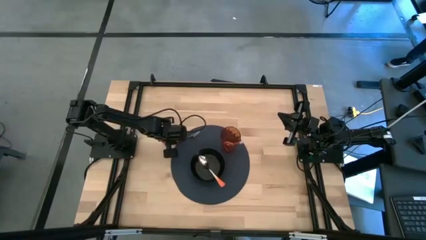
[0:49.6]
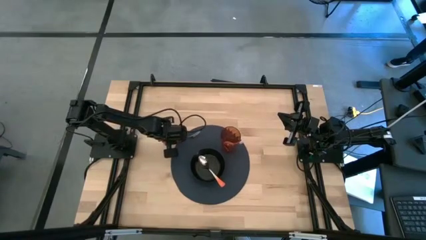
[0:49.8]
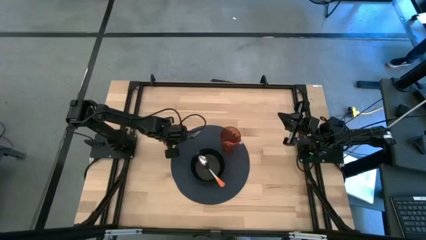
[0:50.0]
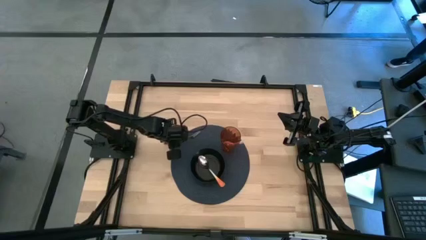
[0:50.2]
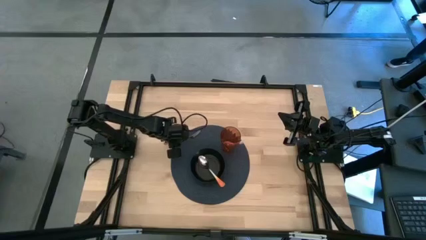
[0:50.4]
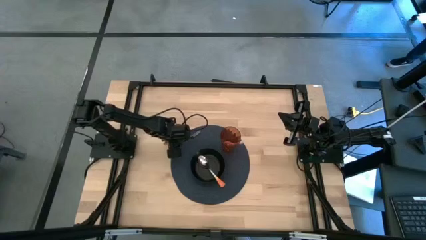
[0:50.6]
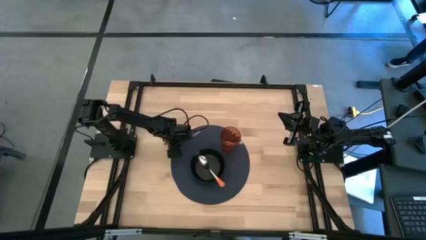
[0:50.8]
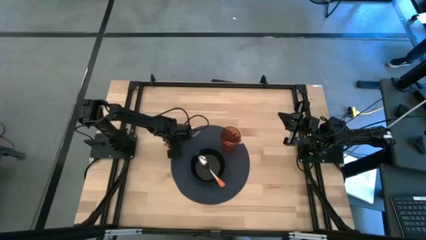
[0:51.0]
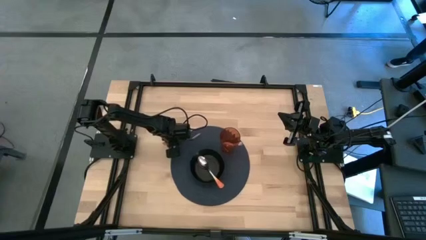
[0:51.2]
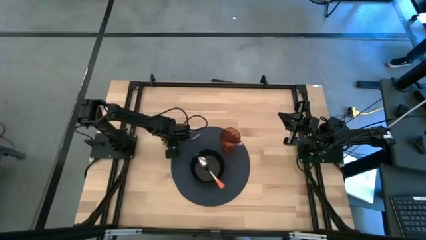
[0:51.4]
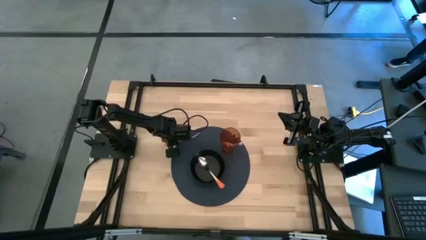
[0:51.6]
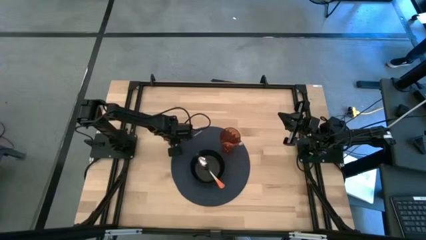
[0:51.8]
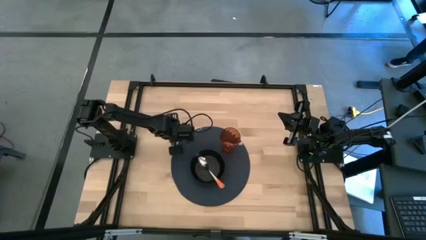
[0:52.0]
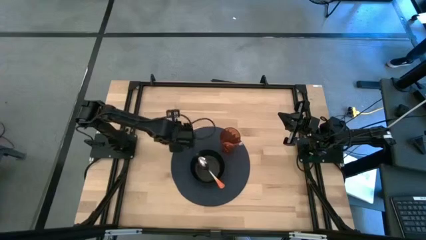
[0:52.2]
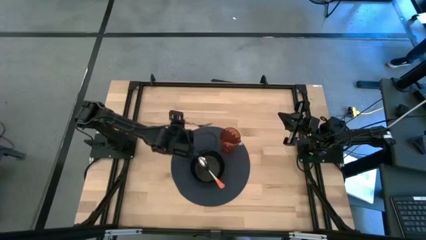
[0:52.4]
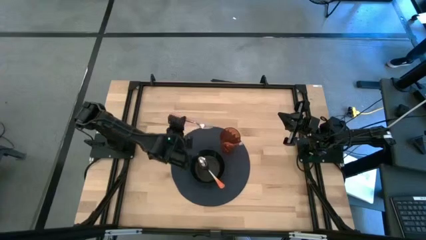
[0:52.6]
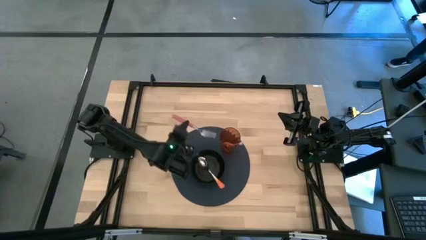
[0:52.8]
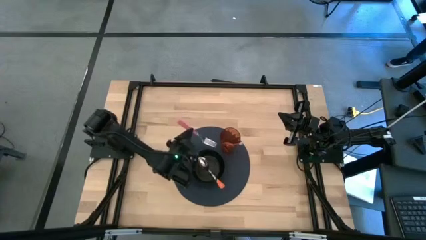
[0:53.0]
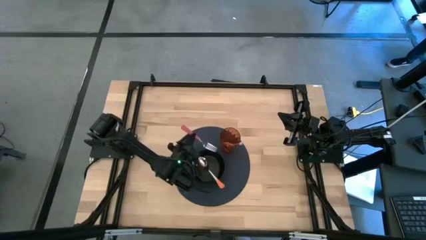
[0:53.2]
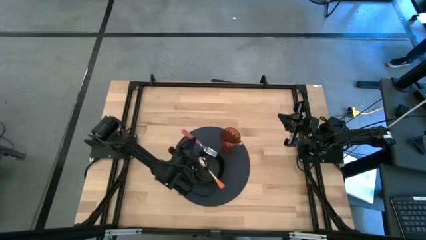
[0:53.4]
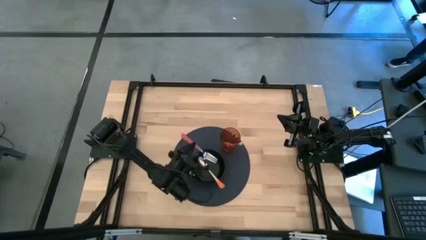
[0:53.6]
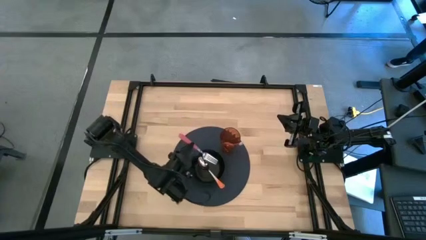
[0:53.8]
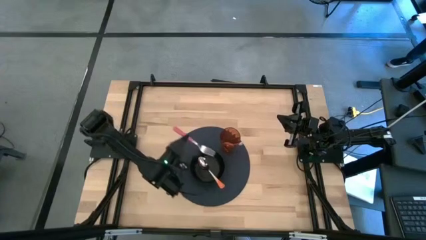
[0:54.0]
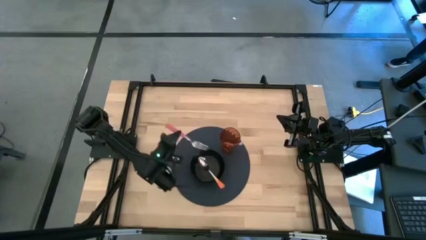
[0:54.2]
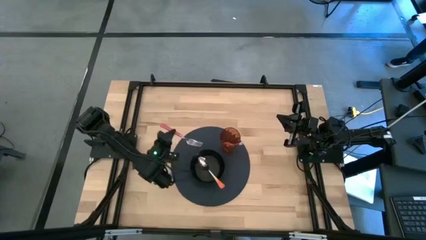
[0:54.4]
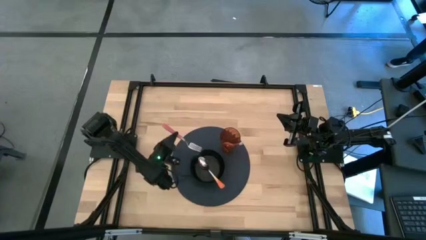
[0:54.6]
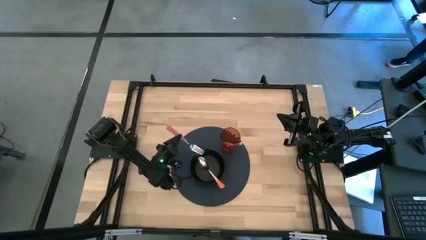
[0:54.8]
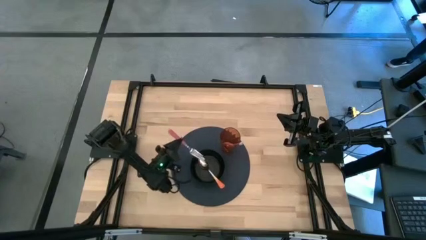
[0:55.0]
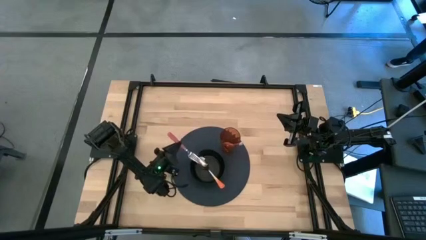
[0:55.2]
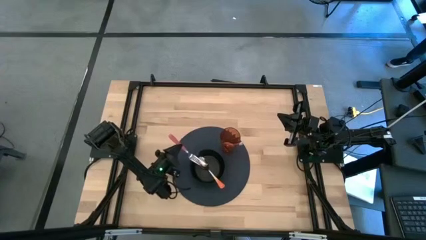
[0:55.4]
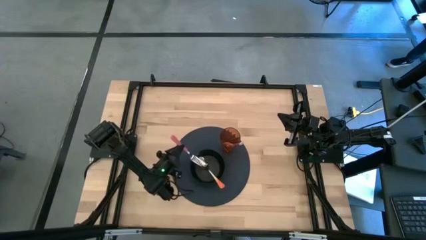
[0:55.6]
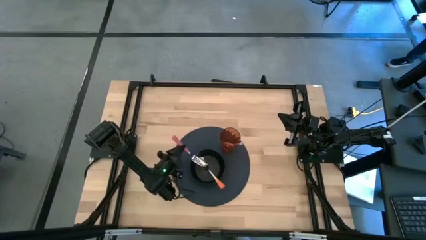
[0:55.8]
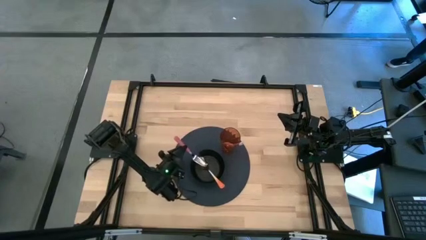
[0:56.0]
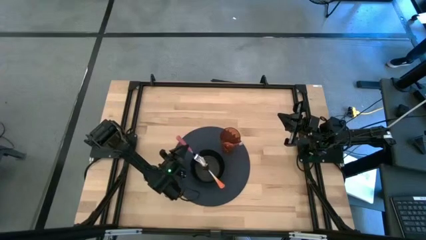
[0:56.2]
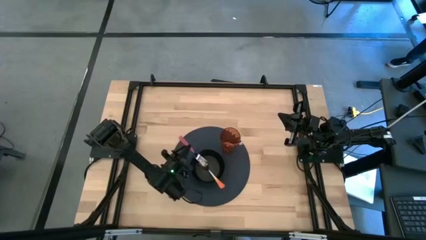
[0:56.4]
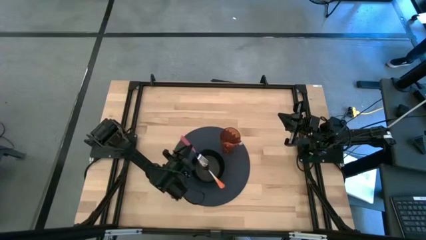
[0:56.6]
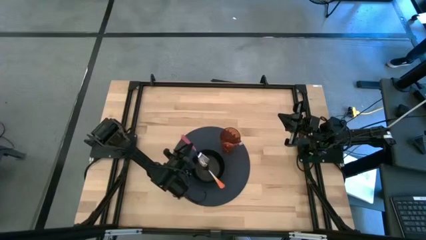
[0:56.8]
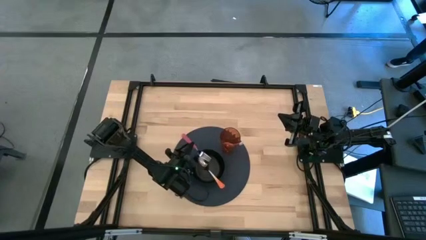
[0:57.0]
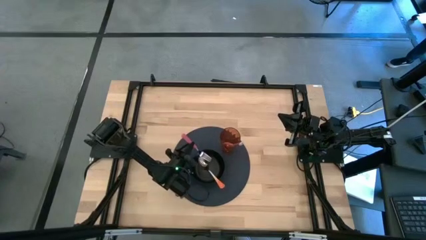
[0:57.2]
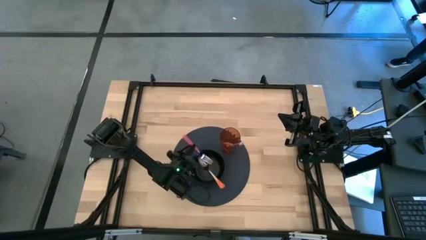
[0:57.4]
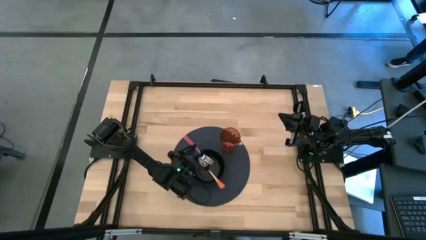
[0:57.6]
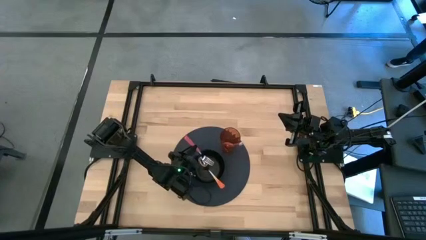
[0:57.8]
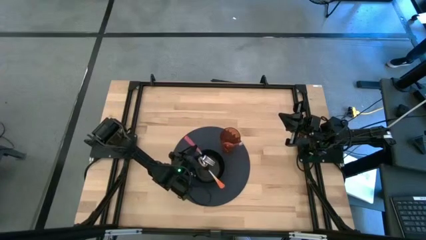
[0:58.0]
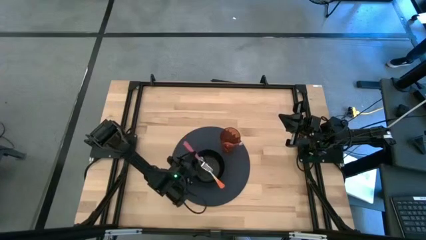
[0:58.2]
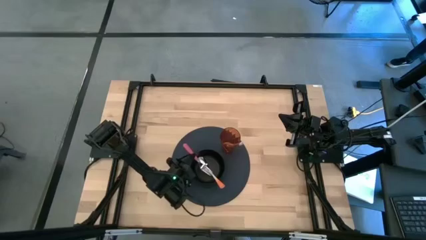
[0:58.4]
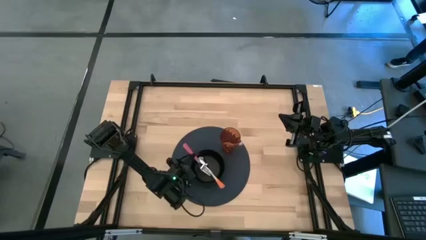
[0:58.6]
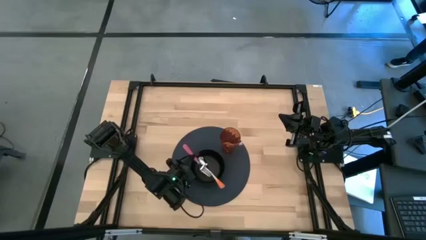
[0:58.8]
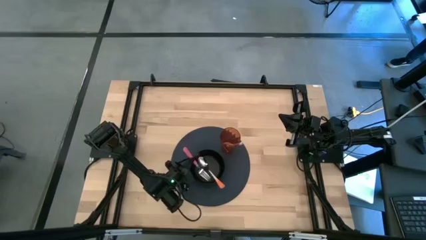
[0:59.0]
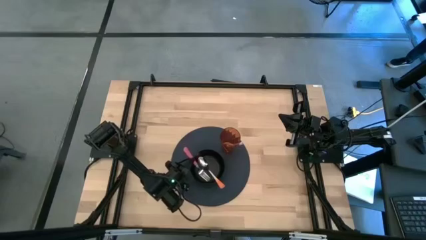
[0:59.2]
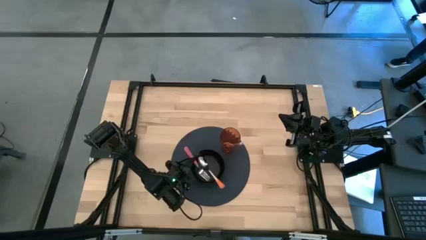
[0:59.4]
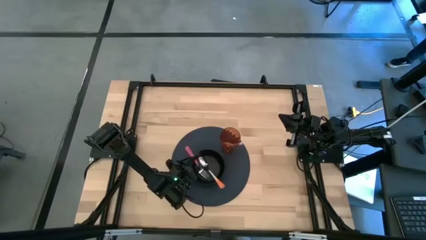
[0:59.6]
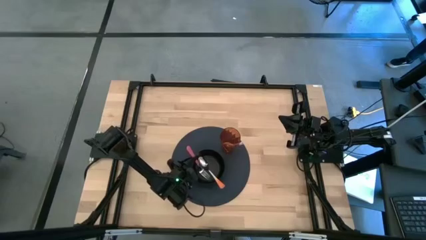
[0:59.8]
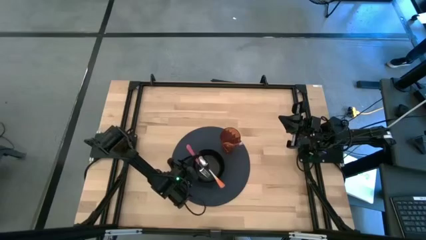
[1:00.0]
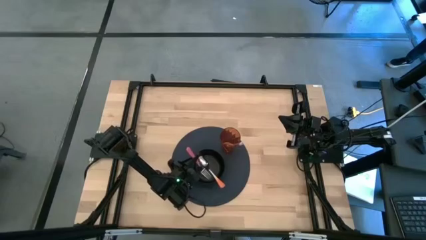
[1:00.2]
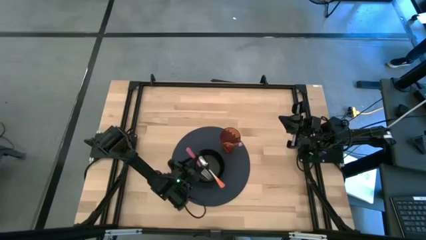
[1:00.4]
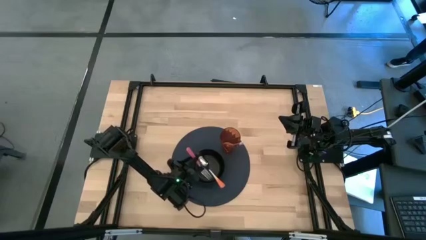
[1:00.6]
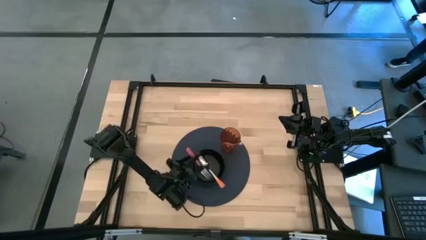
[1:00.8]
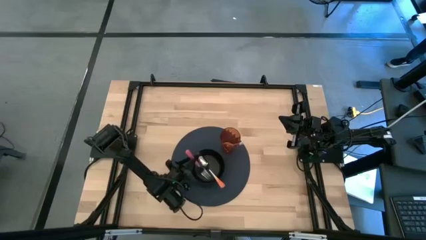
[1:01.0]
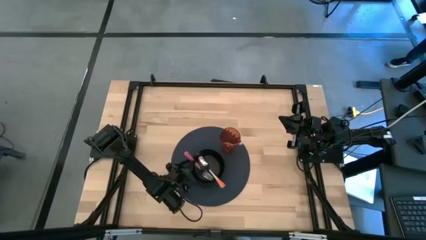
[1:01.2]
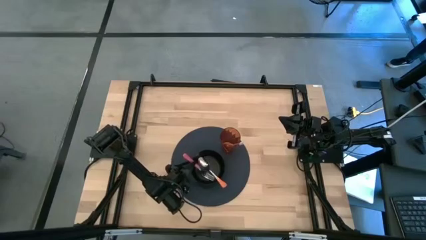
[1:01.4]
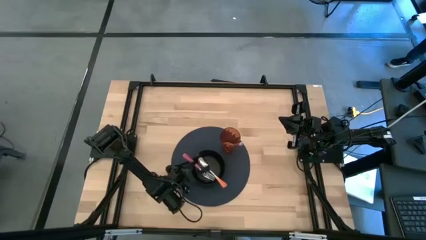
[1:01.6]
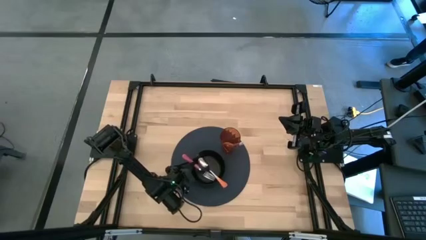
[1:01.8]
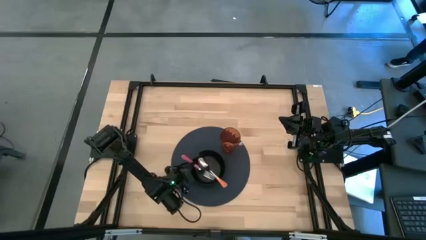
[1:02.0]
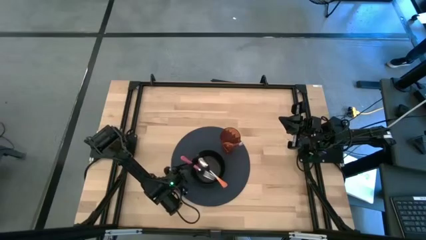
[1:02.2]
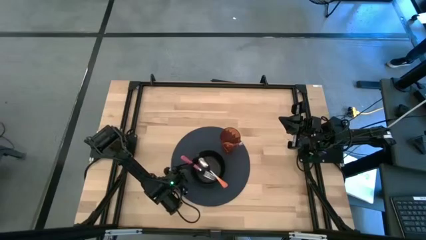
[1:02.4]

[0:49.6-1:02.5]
Task: Pick & Place Utensil
Put the pink fork into the black bowl

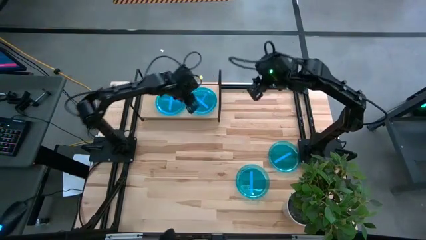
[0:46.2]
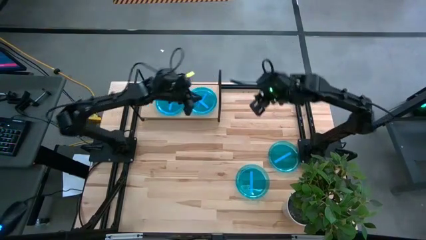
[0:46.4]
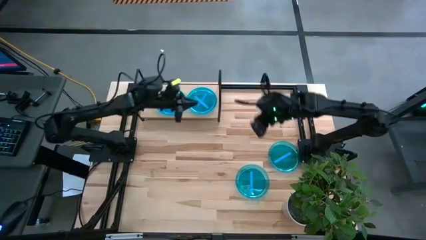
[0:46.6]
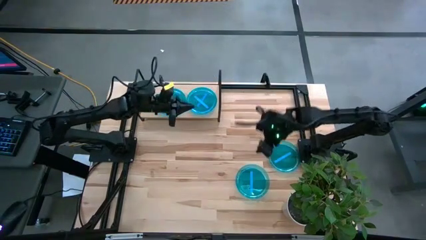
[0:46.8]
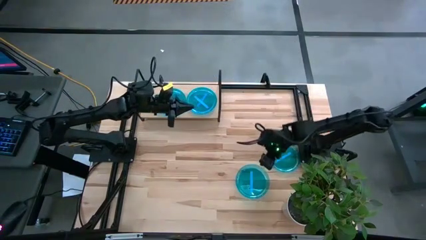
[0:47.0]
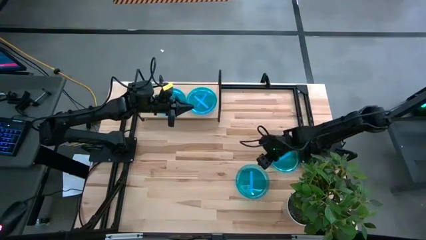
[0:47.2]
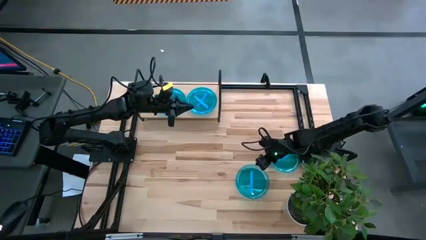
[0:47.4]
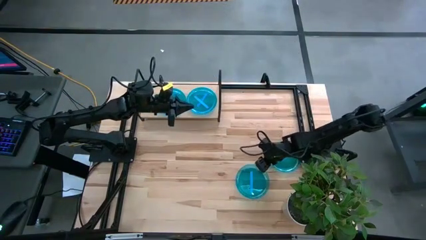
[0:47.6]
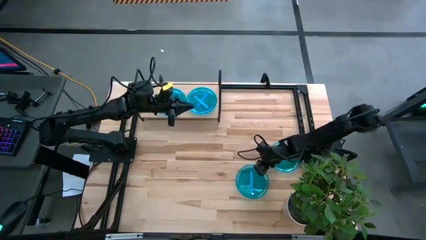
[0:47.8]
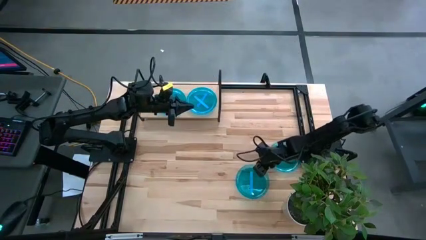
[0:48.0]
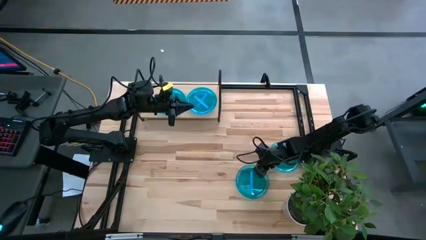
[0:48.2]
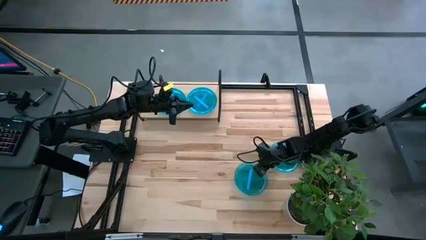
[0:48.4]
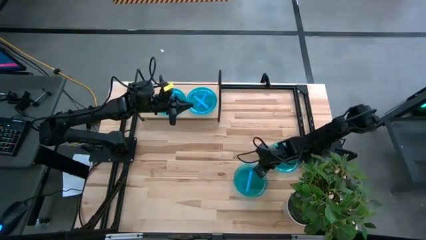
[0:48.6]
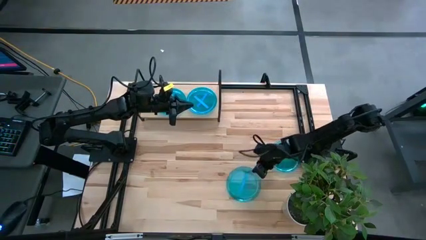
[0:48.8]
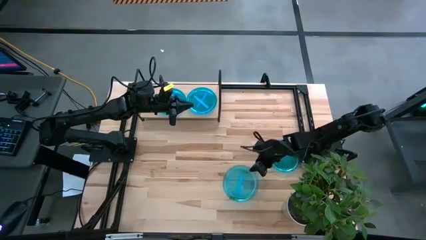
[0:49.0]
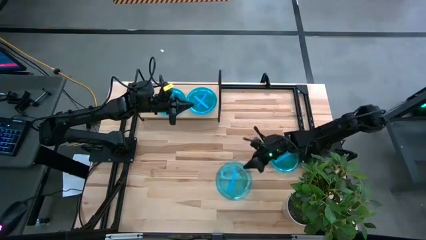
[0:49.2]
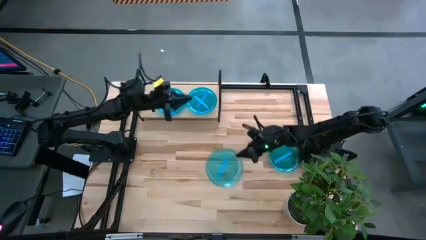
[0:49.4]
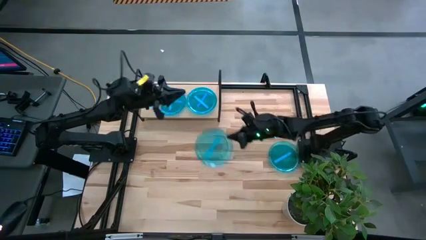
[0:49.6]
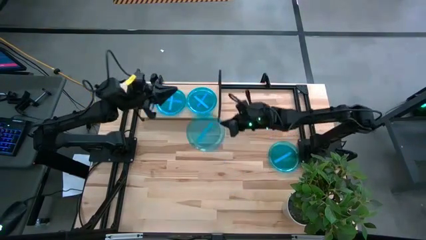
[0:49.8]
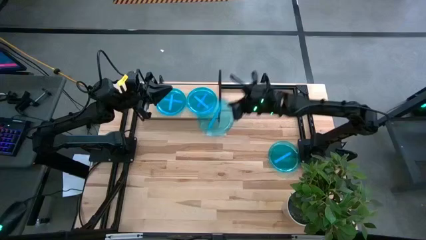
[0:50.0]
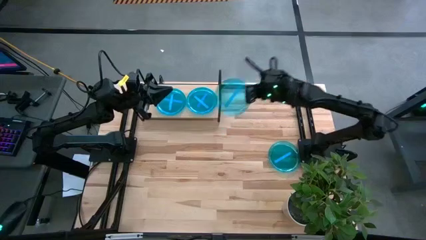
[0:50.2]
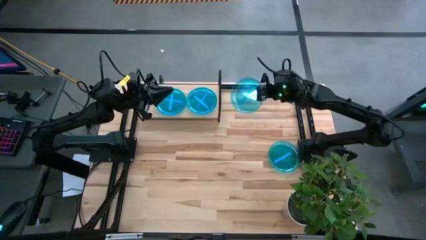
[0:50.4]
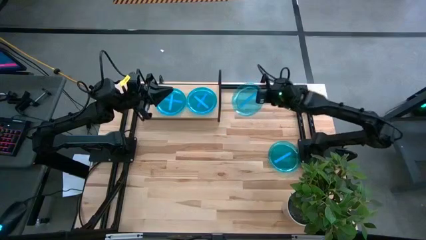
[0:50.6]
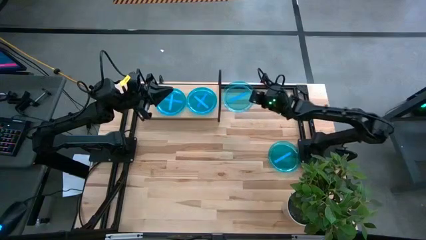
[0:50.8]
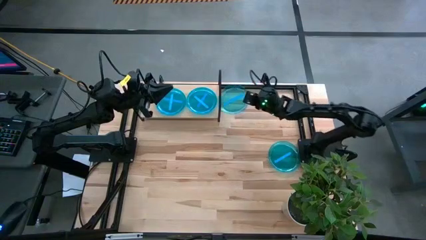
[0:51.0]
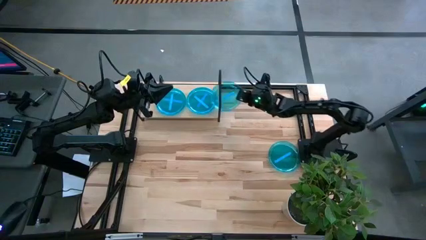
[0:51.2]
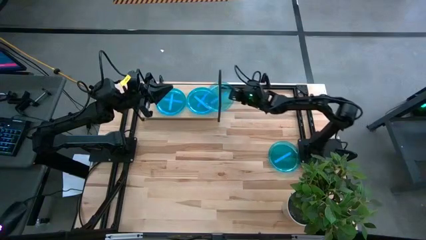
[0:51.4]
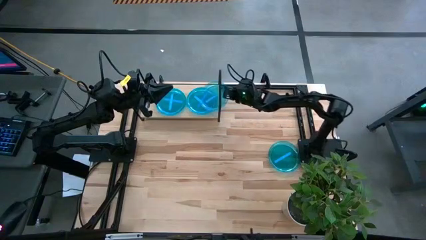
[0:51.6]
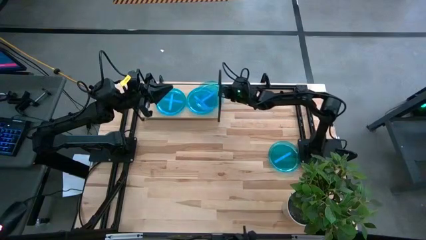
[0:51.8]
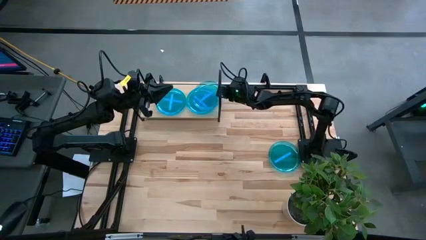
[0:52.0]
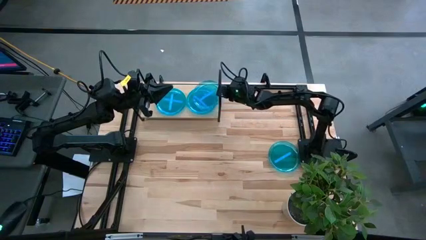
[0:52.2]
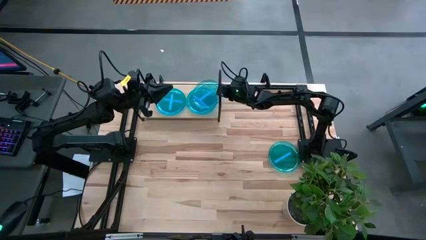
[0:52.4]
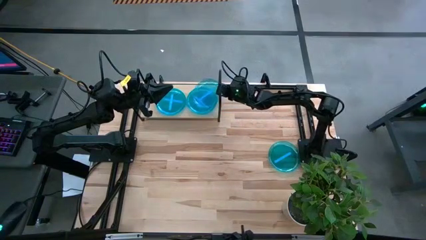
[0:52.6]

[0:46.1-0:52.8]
Task: Place and stack plates onto a shelf
Stack the blue plate on top of the blue plate on the shelf
